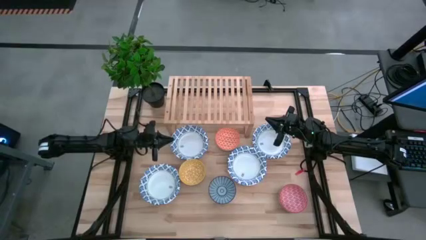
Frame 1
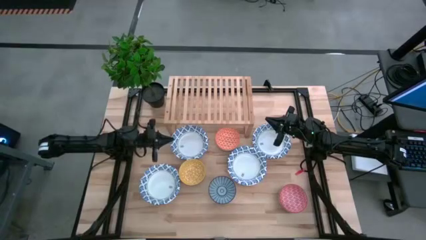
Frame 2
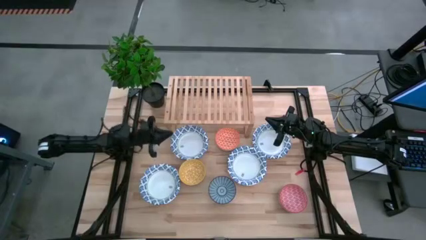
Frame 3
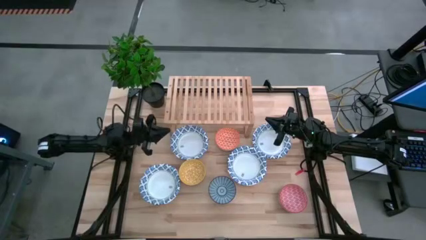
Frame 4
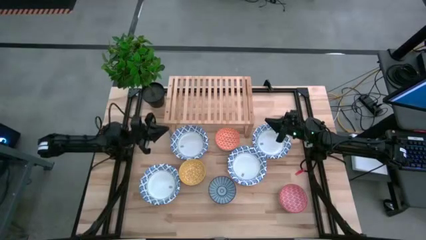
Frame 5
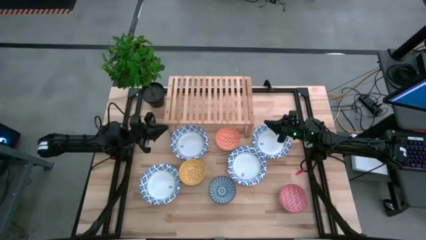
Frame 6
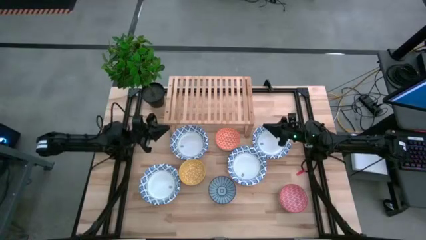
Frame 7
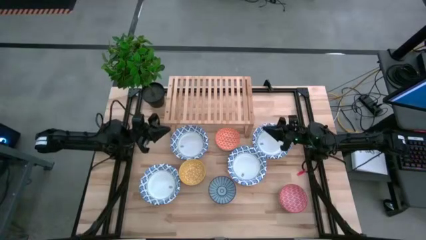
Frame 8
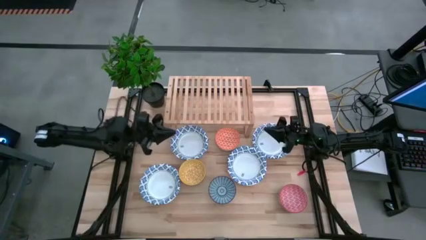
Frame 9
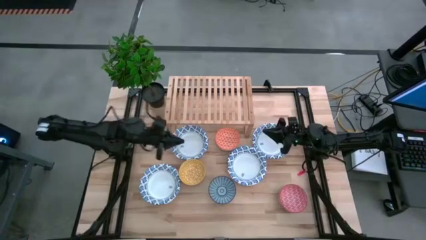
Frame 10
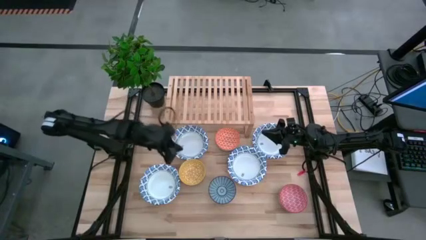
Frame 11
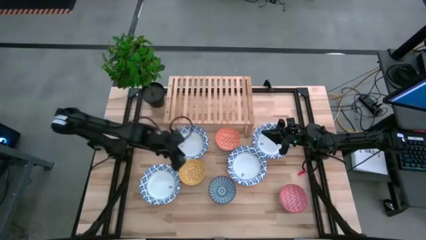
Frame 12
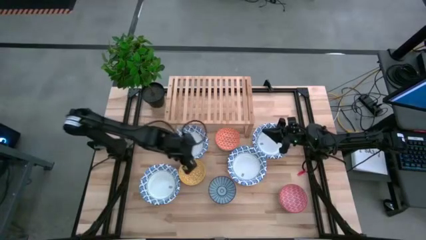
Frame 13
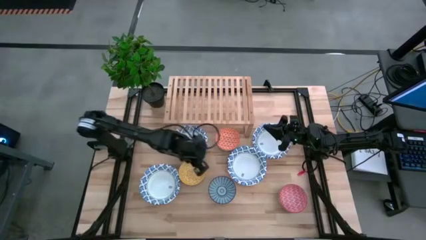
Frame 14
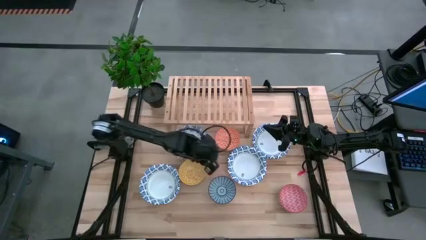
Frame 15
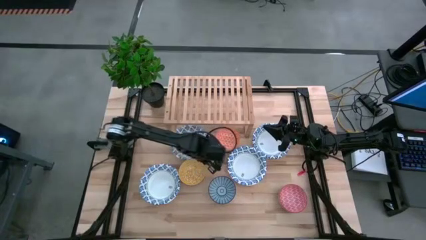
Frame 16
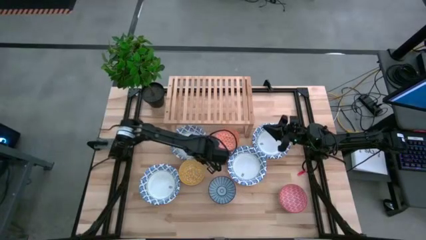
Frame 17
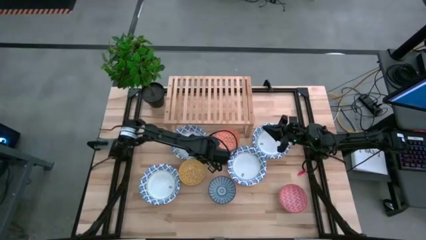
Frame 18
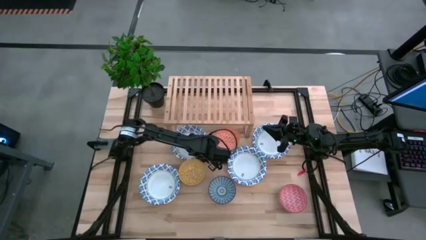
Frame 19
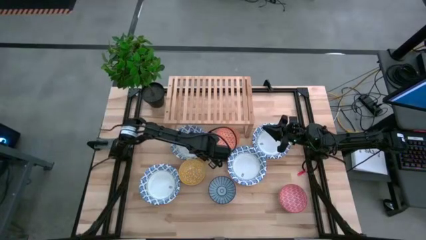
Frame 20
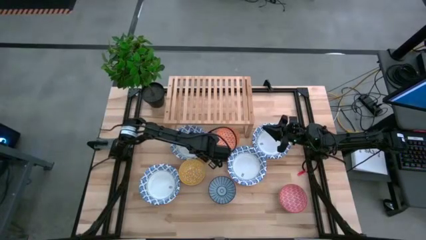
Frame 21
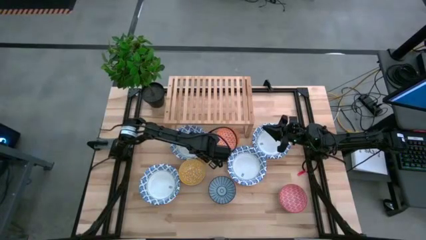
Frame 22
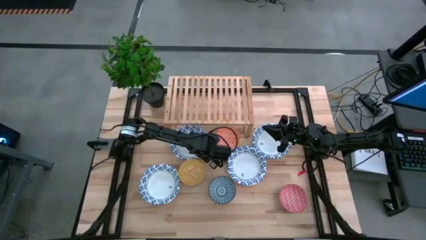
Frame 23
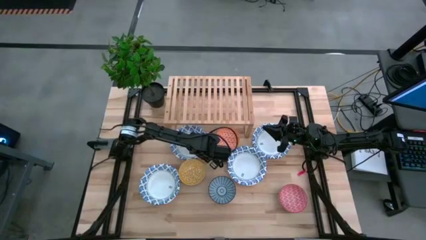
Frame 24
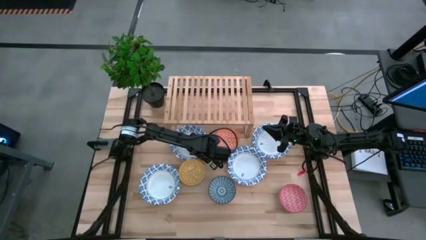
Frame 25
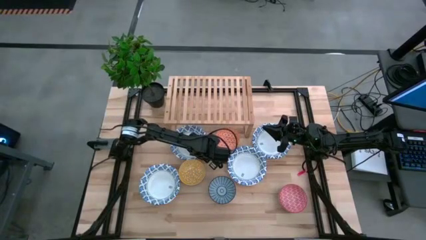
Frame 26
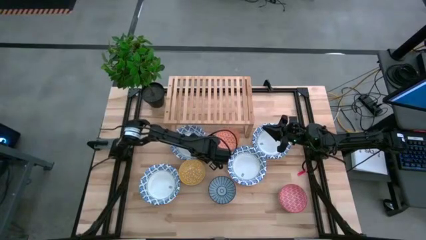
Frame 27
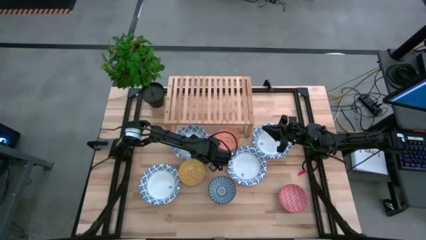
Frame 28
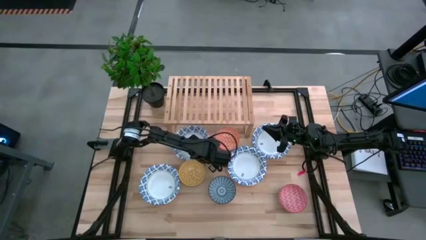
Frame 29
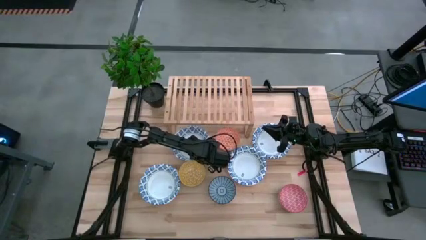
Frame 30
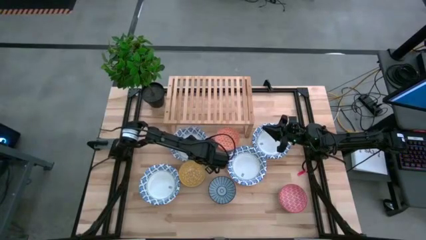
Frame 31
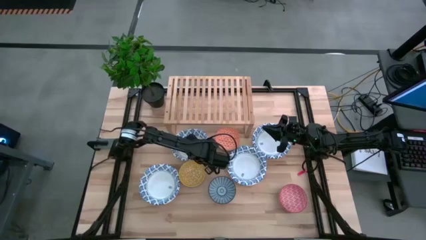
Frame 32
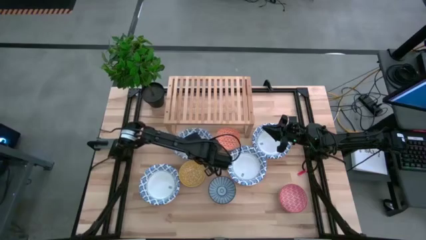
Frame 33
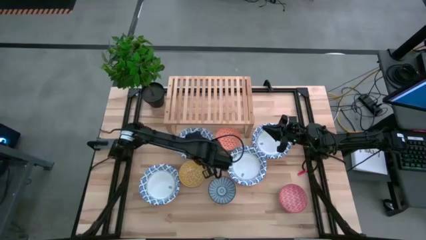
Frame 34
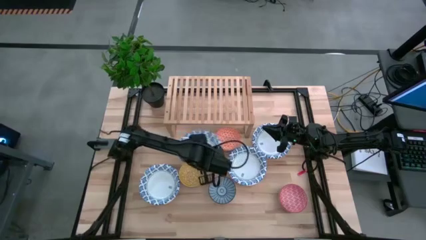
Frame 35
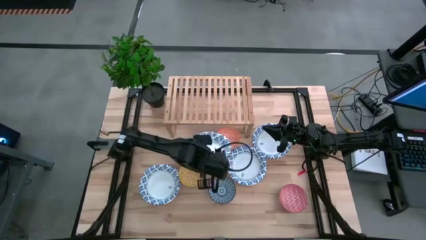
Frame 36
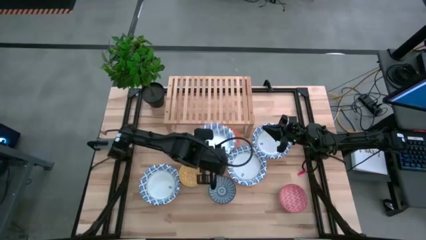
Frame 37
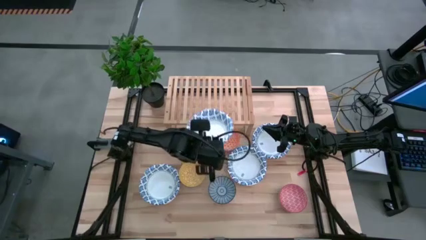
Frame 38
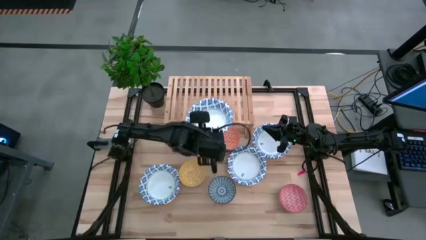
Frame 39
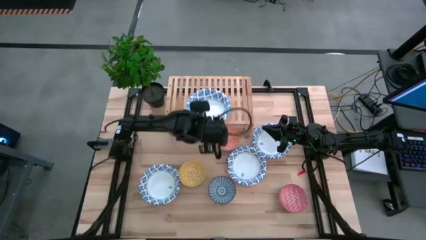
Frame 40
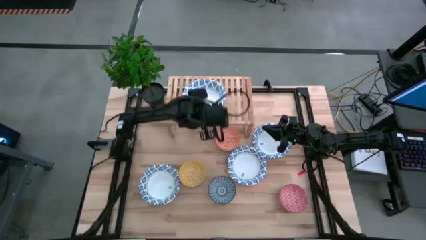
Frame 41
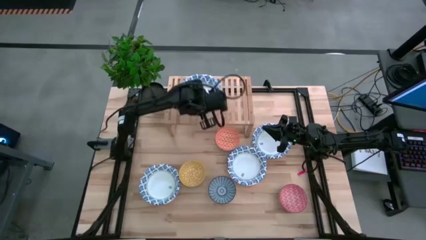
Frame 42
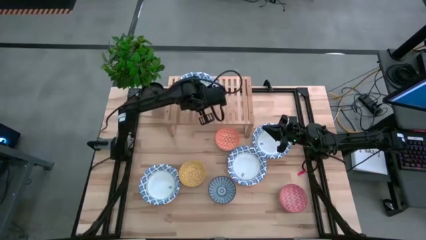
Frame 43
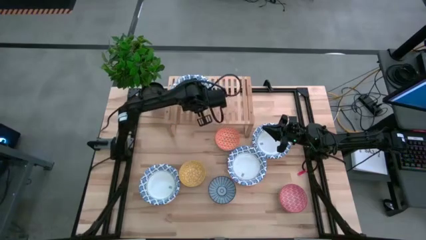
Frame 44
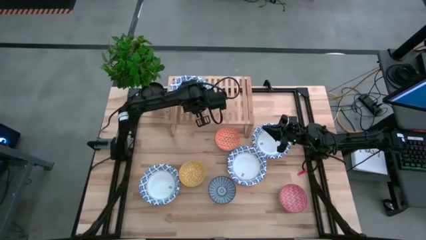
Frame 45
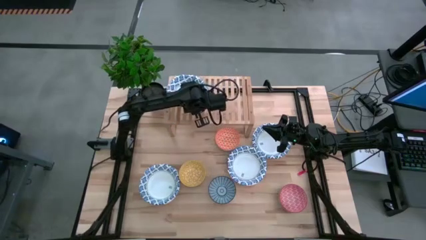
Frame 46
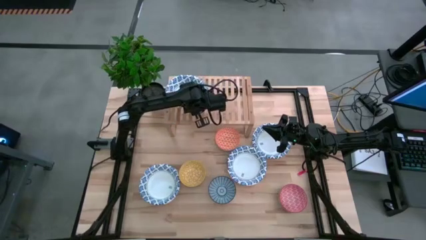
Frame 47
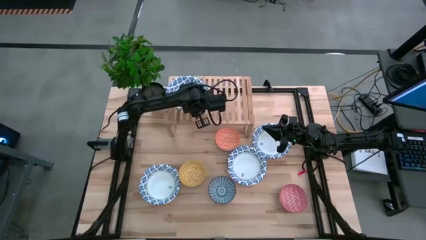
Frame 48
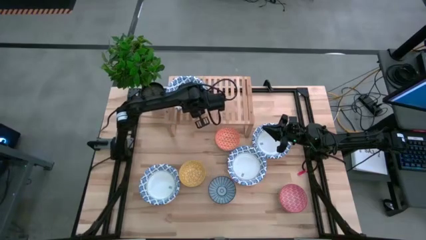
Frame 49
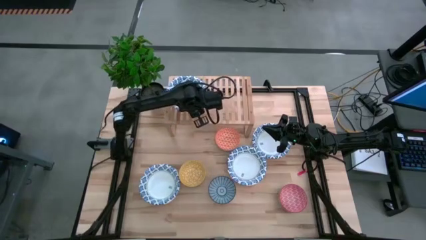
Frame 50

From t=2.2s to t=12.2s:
Task: Place and stack bowls onto a shelf
Put the white blue patterned bowl on the shelf

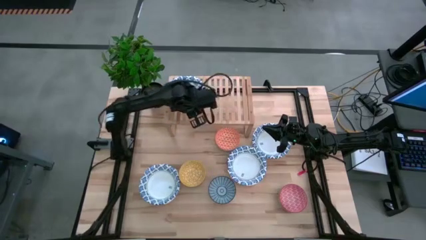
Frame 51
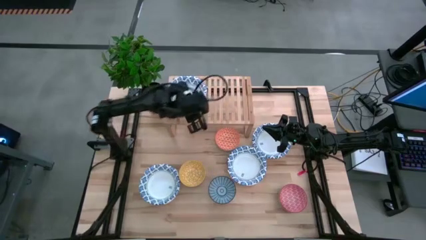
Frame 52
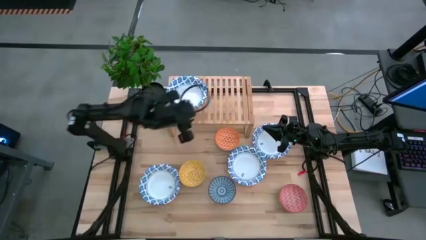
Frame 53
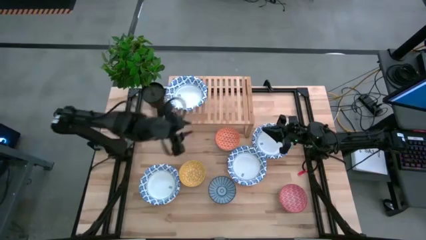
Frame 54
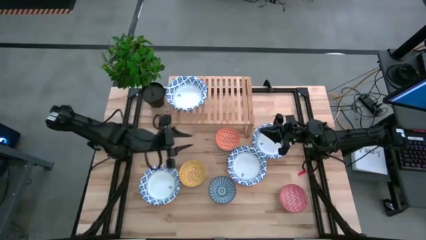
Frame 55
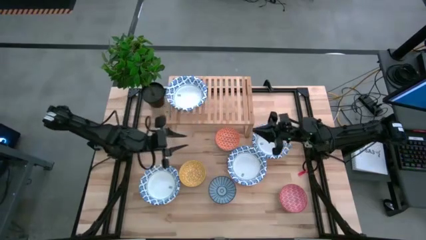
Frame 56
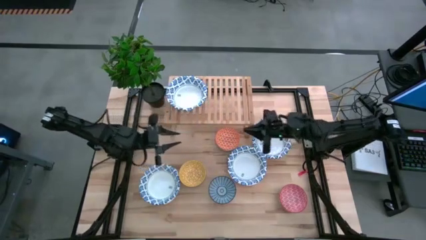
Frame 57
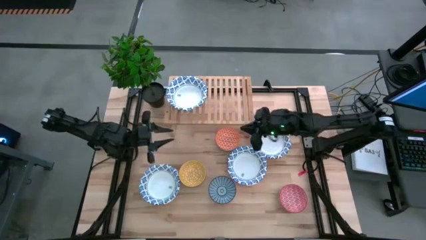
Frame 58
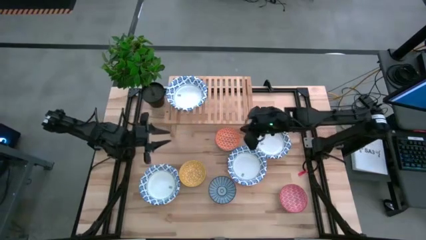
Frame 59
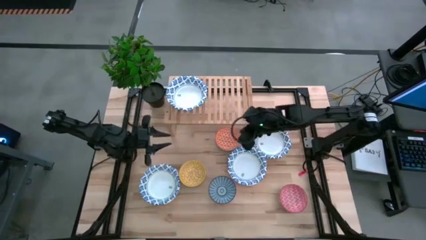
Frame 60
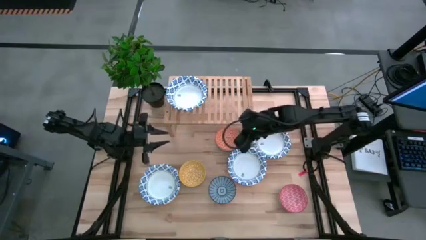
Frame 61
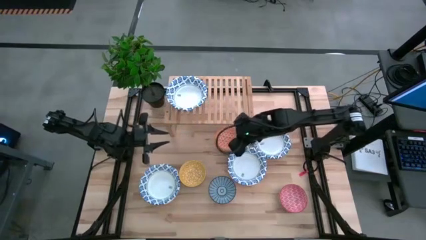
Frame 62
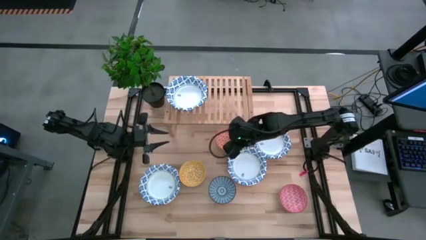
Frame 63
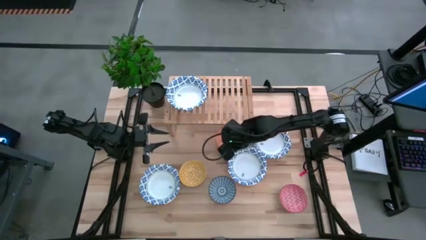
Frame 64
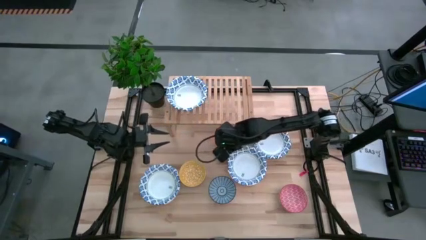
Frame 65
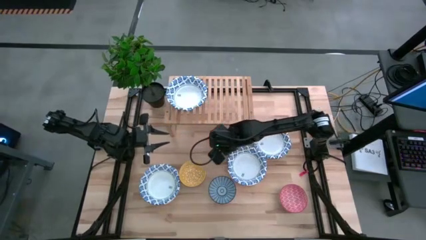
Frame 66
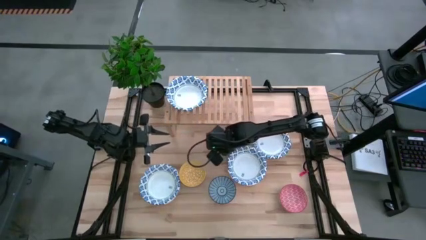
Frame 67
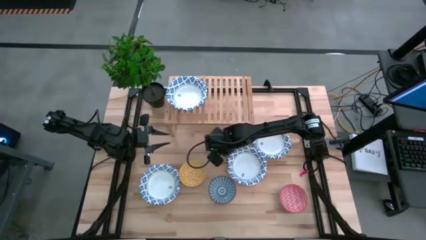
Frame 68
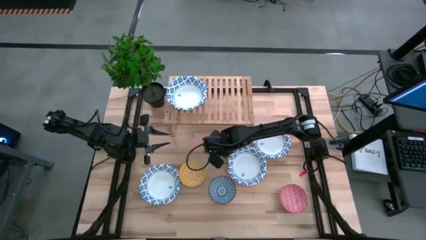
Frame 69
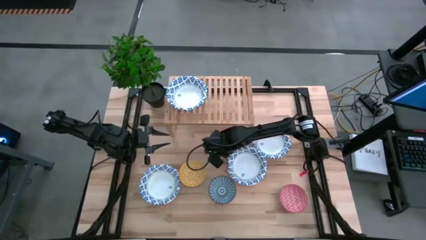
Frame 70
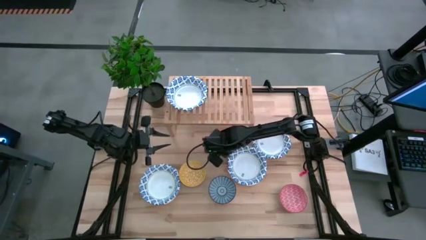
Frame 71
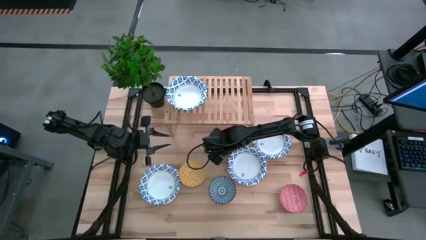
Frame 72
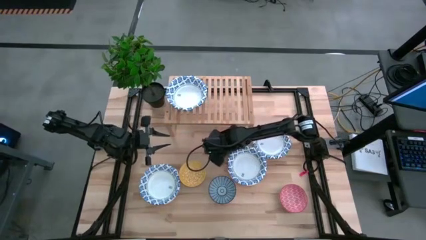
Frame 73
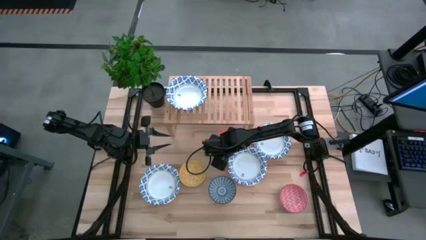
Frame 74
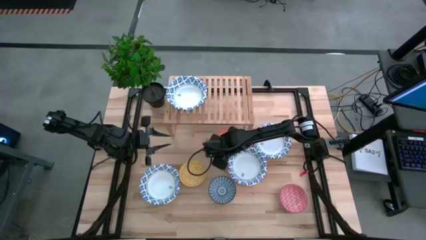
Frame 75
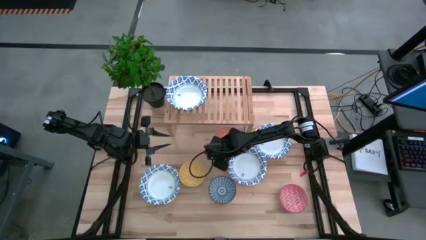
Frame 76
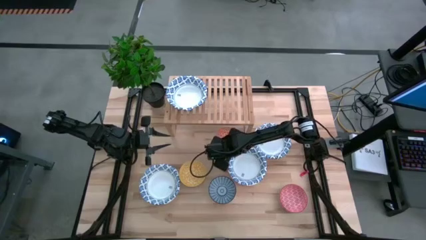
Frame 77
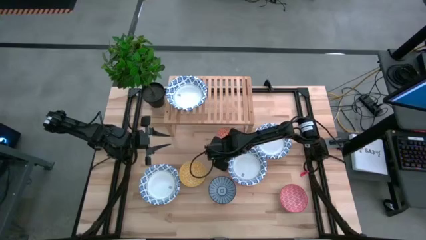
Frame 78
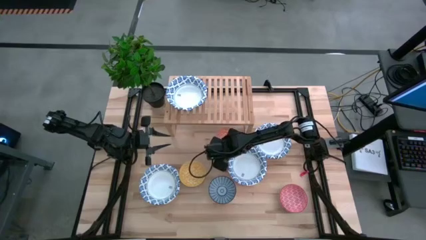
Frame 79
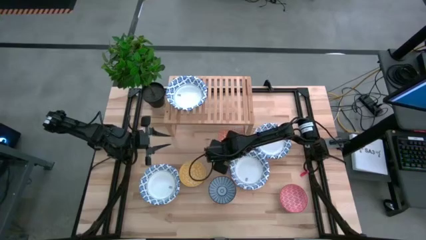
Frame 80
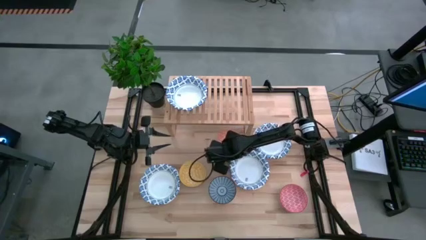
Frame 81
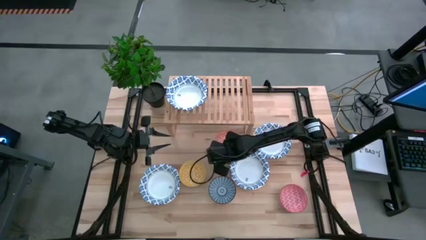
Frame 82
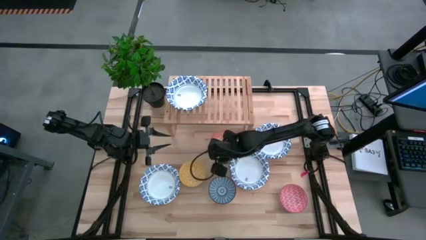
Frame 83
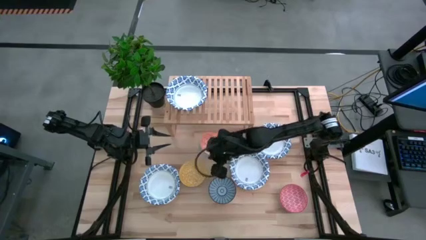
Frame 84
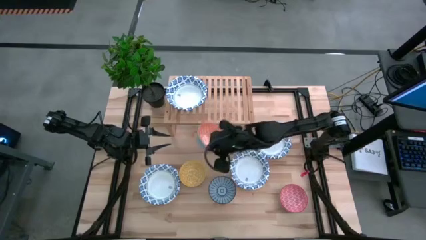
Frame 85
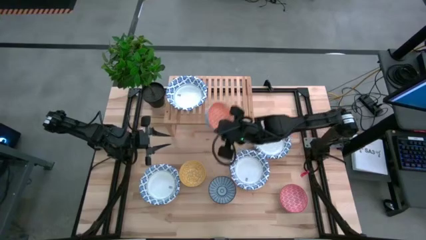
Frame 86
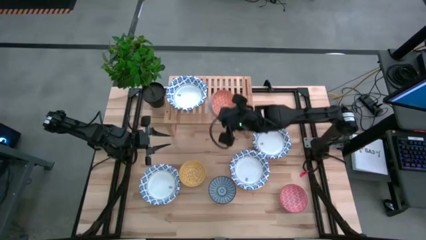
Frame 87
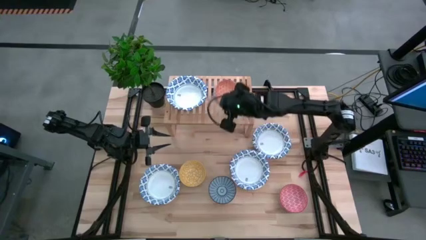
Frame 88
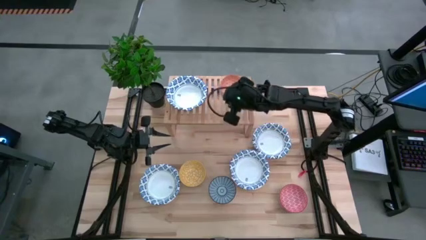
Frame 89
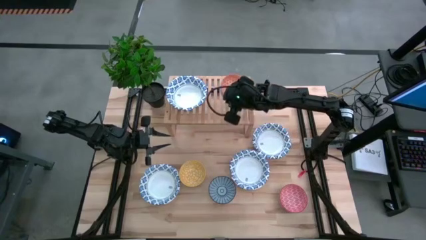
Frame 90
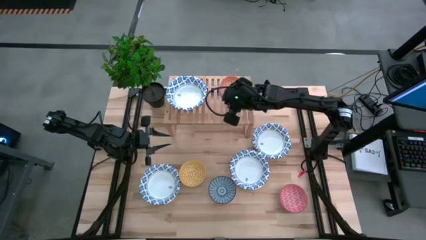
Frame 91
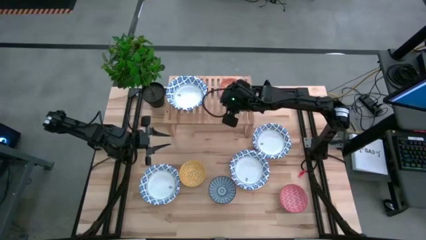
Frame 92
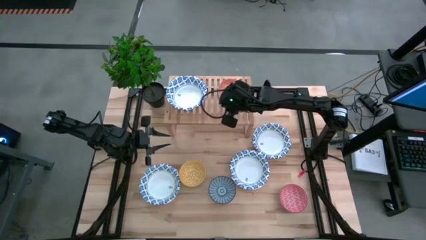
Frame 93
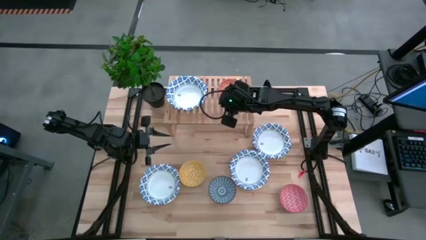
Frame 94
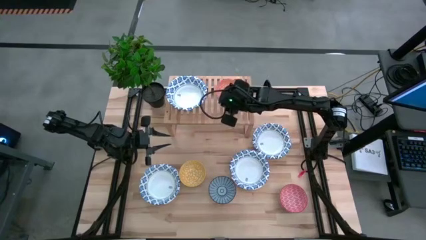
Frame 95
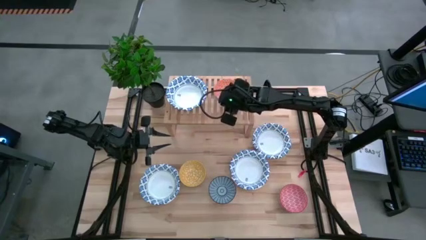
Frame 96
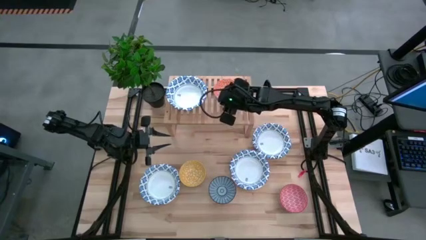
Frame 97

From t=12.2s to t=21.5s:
Put the orange patterned bowl on the shelf
